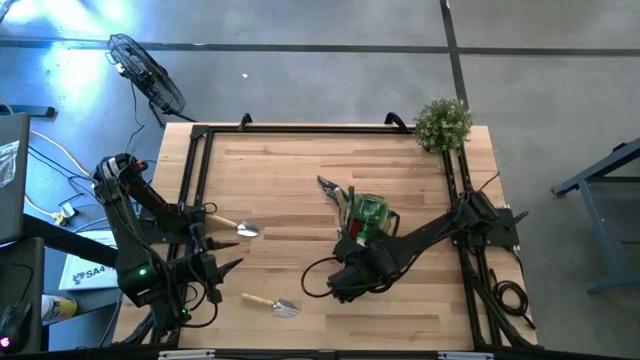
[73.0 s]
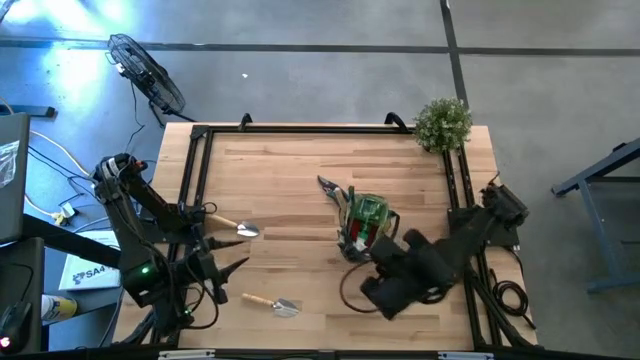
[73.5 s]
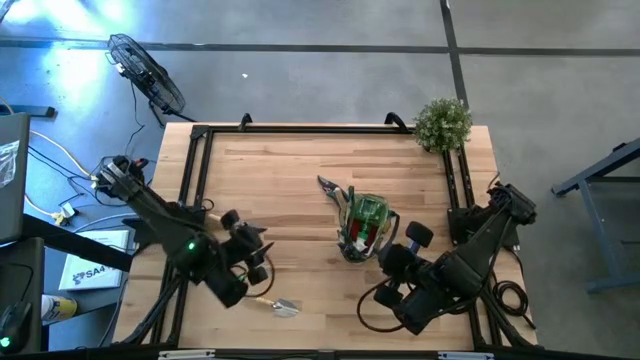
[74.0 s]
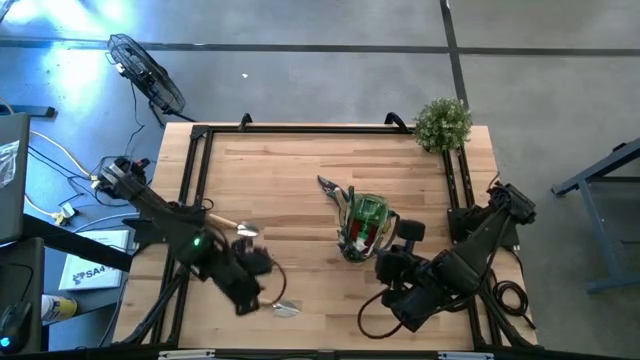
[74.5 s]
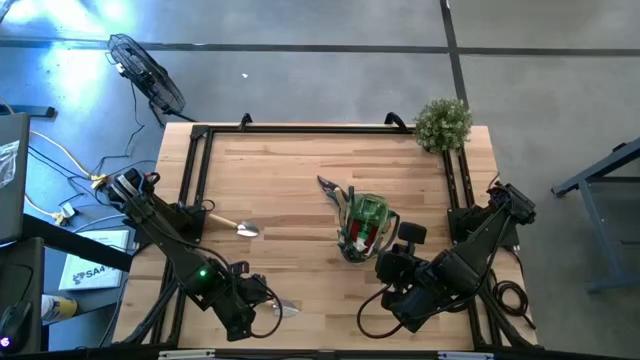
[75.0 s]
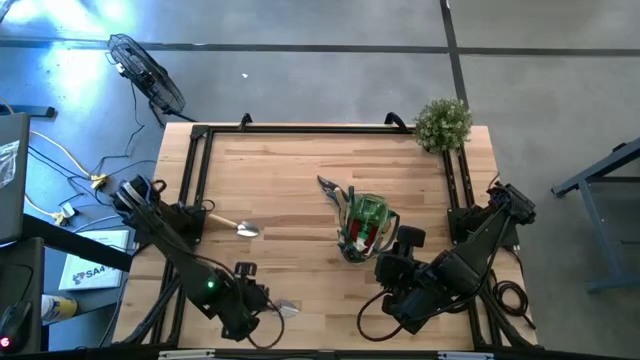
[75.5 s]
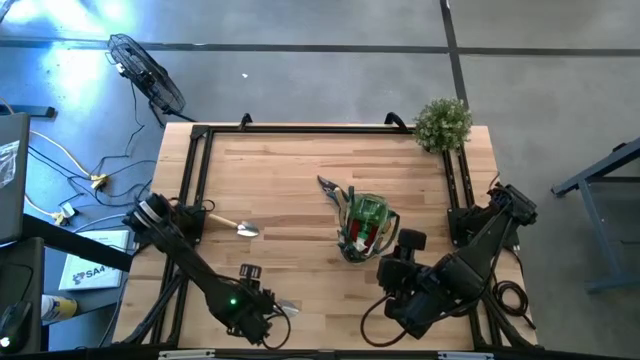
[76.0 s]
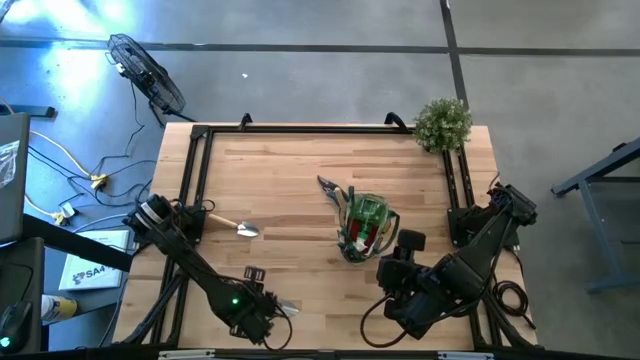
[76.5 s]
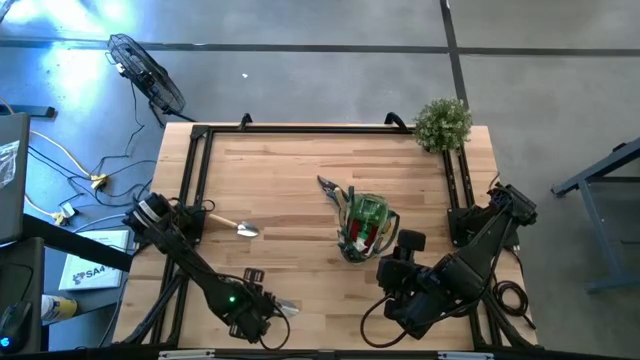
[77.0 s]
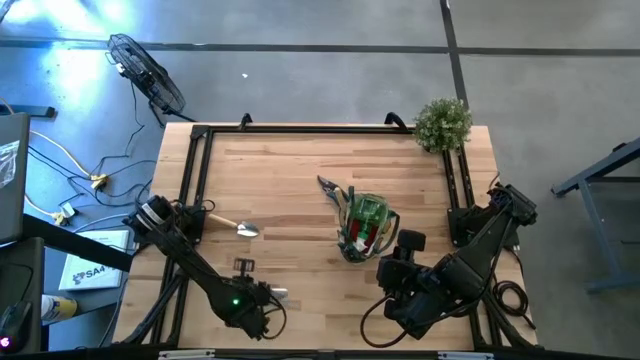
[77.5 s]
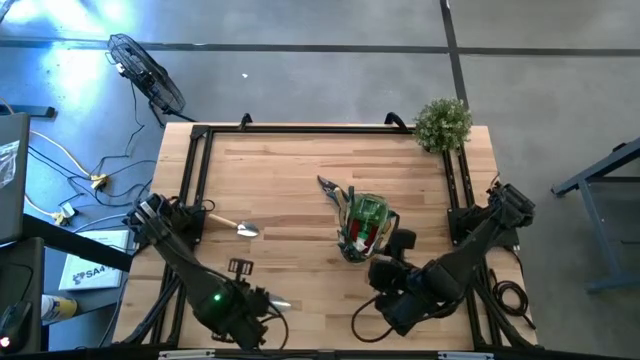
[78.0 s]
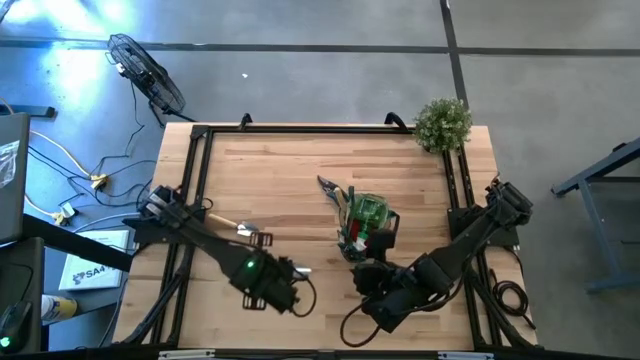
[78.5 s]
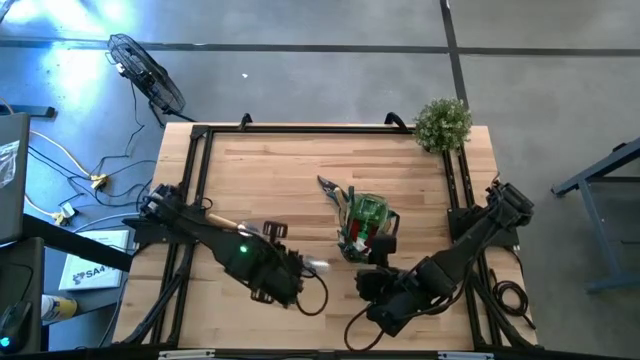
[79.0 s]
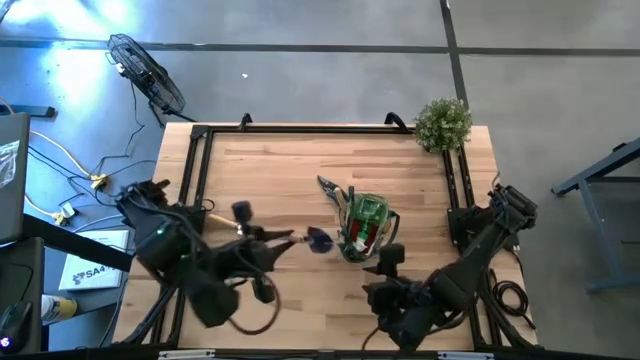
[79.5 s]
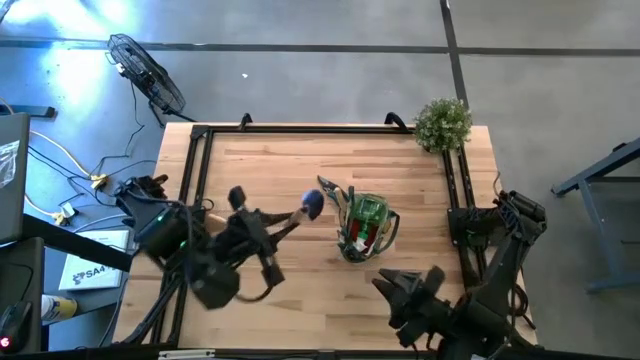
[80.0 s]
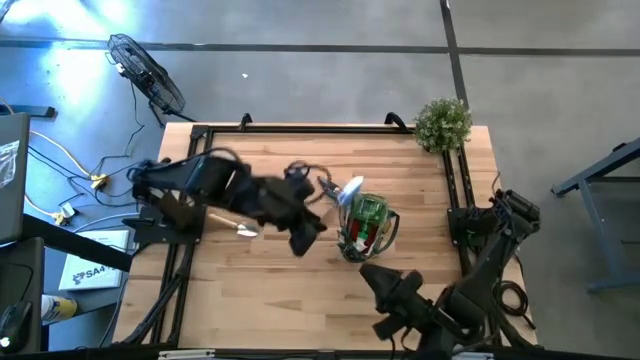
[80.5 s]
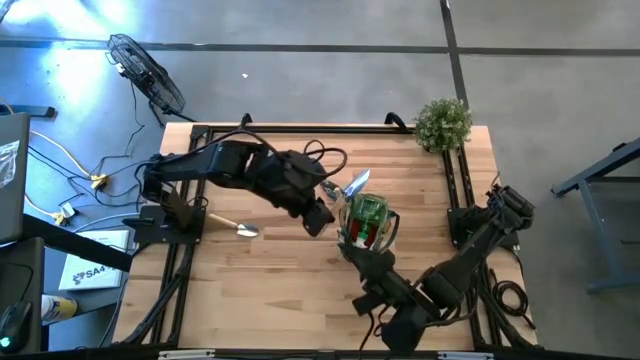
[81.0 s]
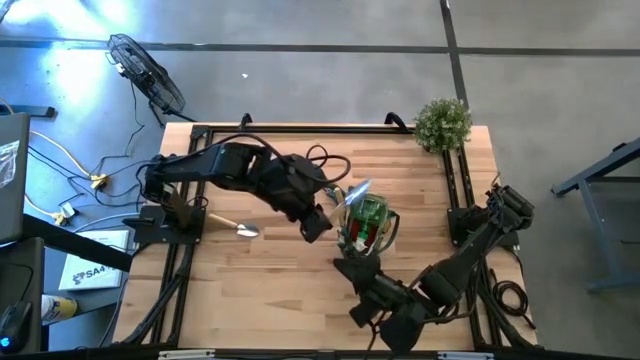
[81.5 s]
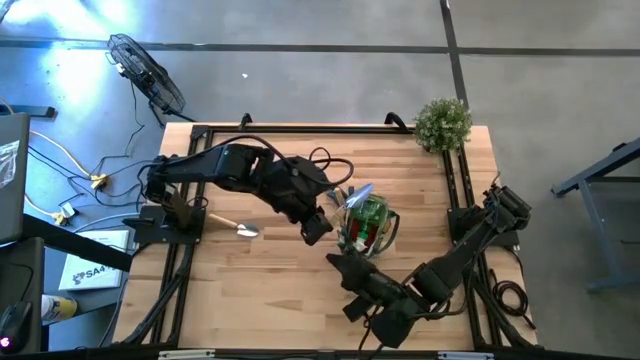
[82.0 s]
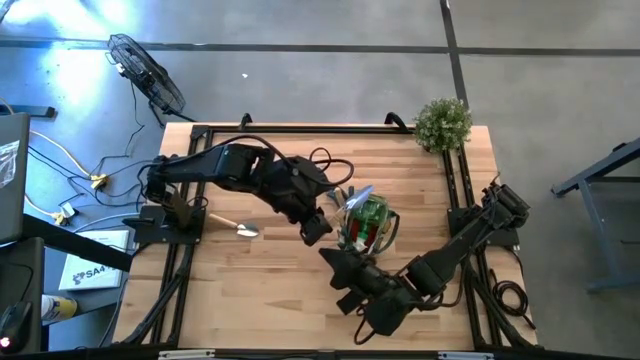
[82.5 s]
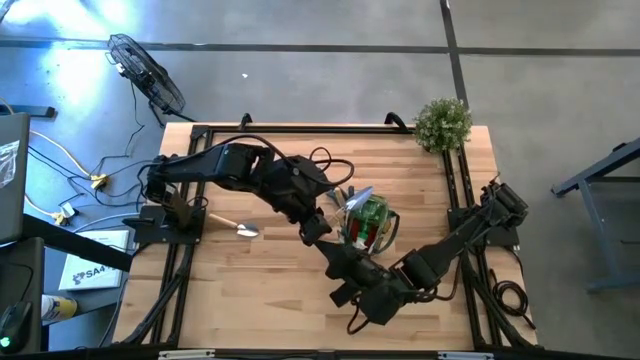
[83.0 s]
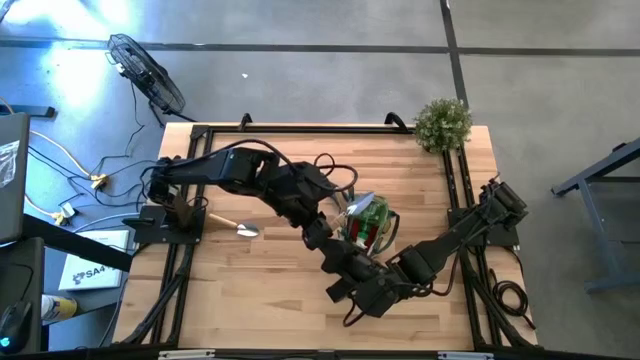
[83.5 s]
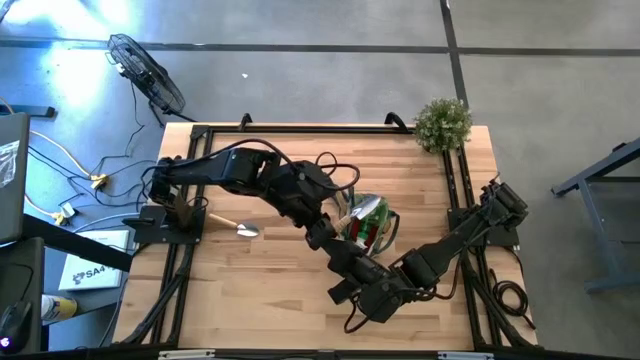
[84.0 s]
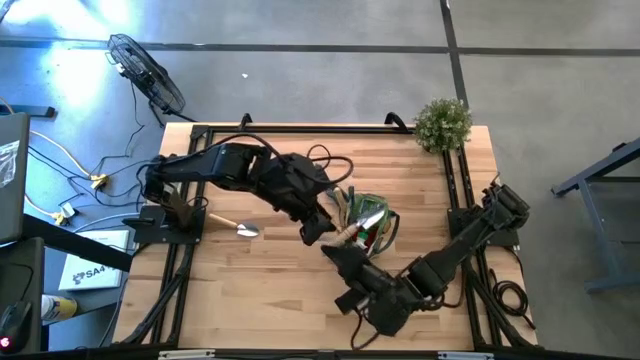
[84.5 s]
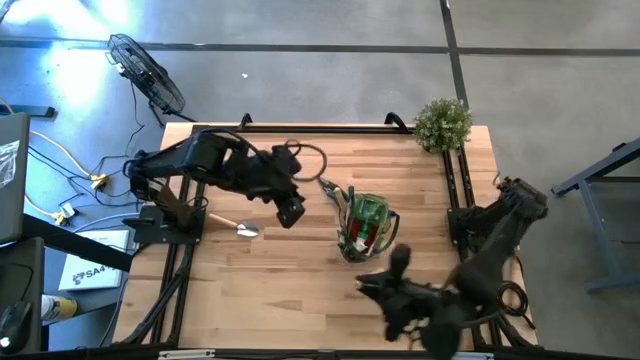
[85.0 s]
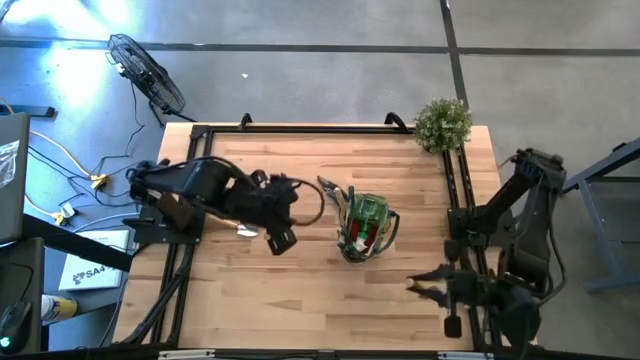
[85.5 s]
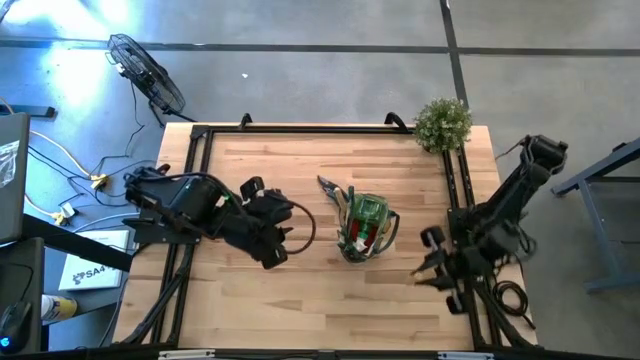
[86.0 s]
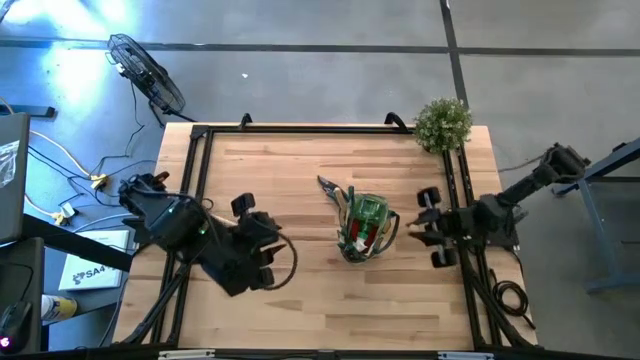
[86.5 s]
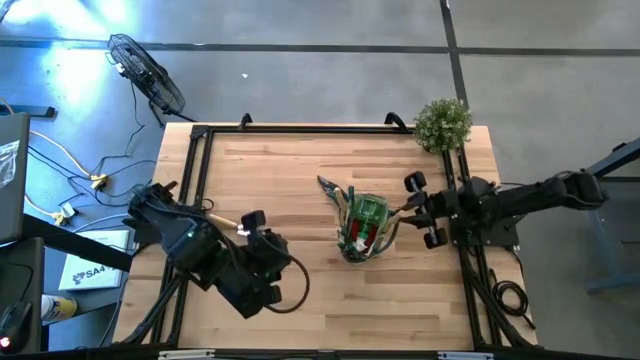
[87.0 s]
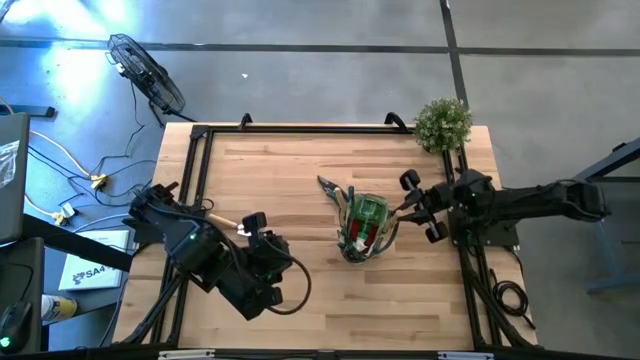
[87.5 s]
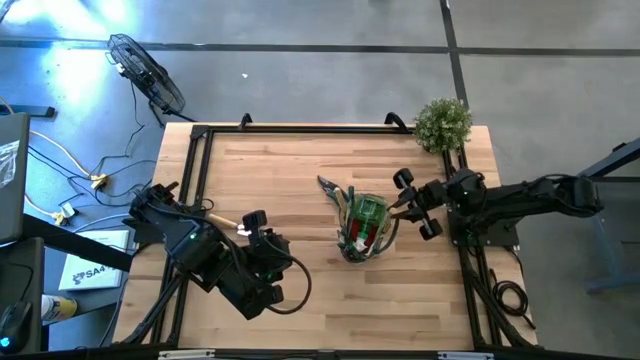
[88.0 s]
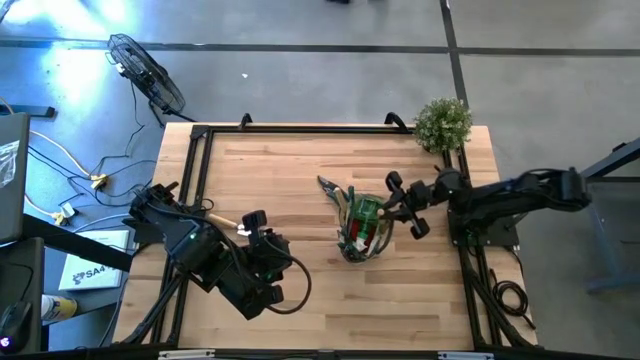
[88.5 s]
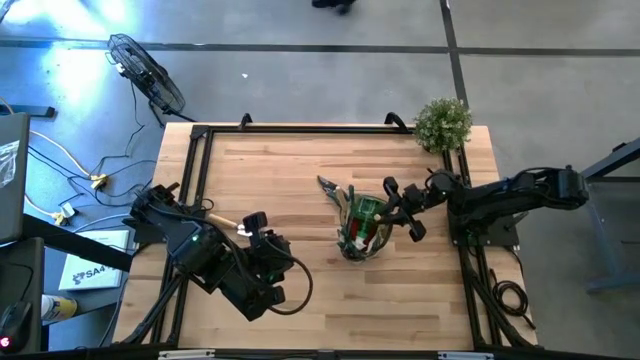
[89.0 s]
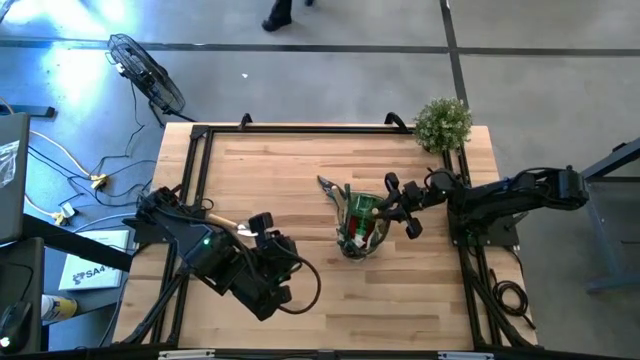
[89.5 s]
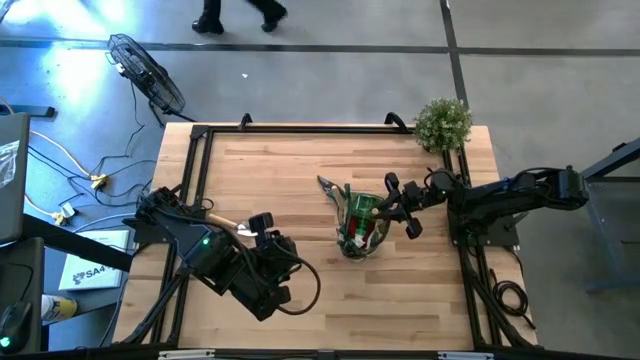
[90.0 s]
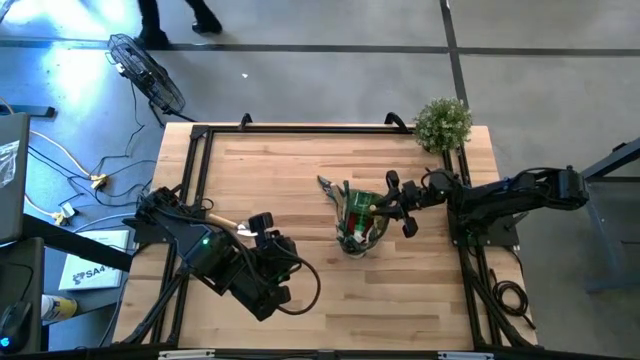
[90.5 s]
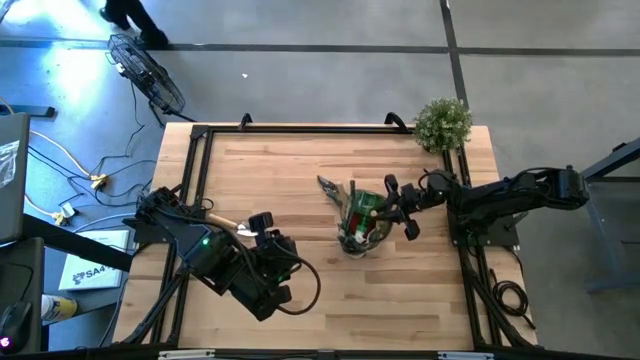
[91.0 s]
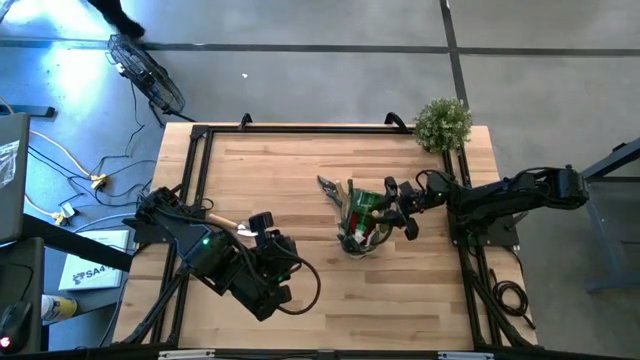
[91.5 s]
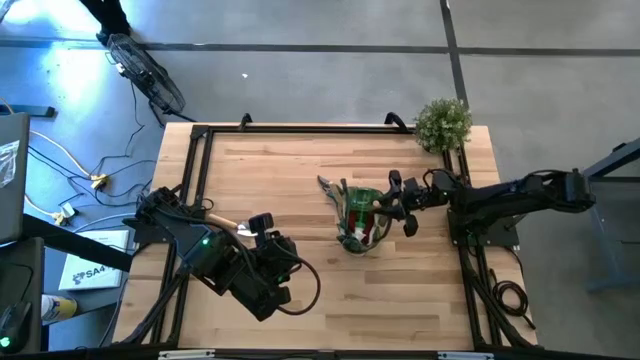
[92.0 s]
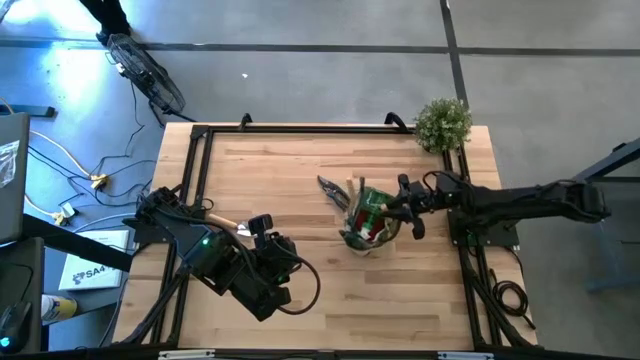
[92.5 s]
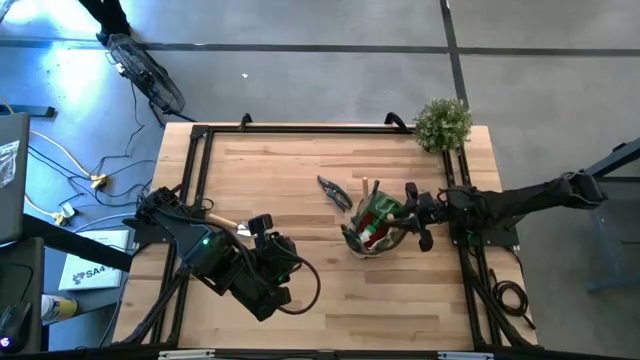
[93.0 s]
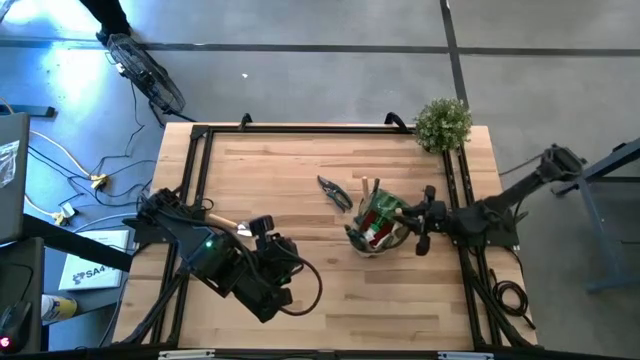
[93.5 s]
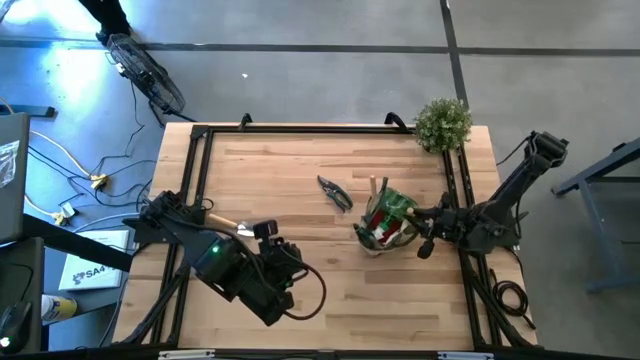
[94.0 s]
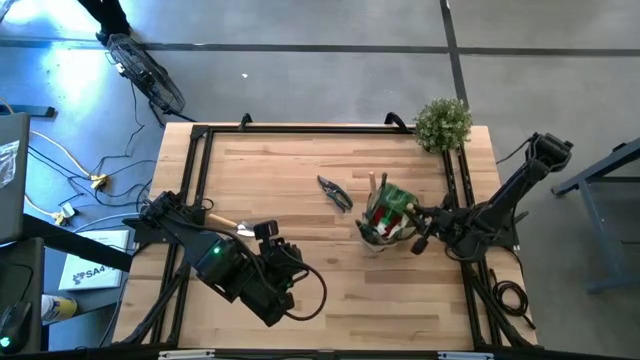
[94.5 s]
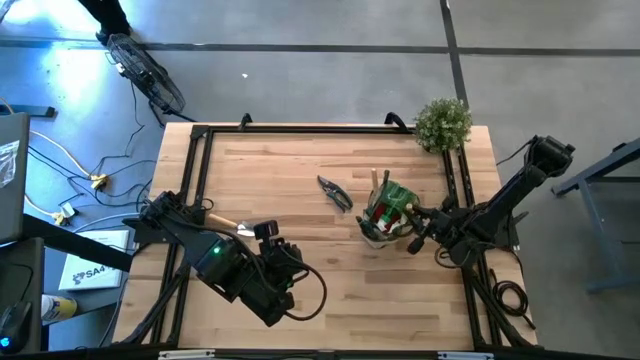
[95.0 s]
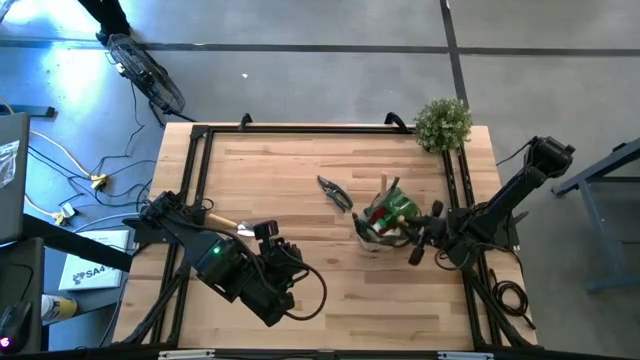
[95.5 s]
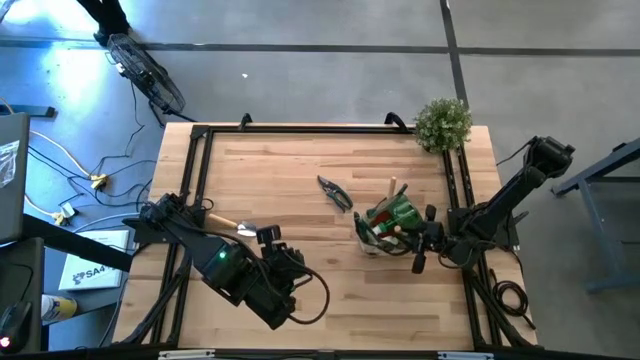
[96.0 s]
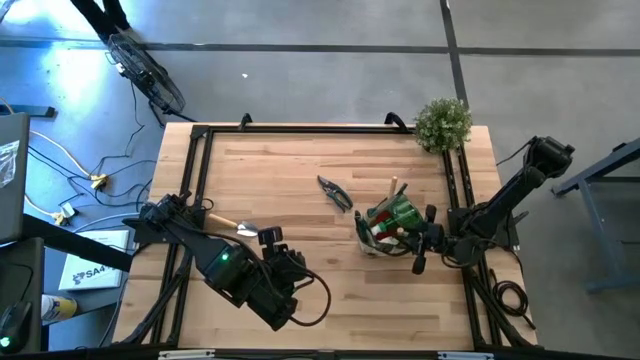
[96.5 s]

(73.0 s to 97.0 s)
Task: Pick & Place Garden tools in Gardening bag
Put the bottom brown trowel into the gardening bag
